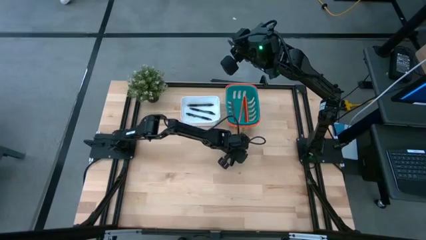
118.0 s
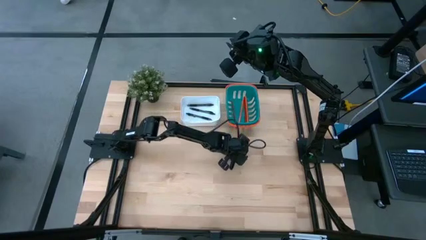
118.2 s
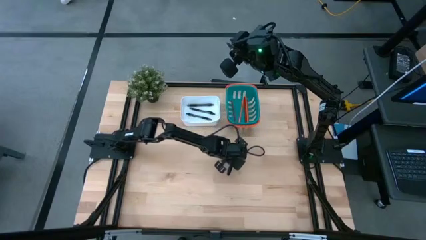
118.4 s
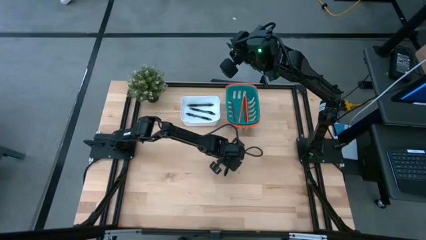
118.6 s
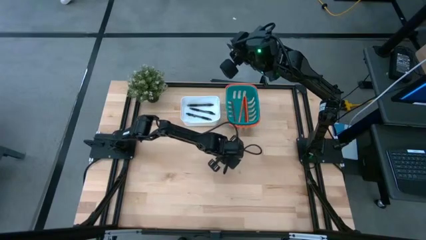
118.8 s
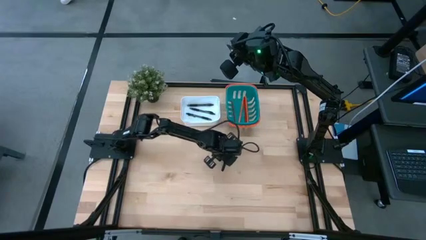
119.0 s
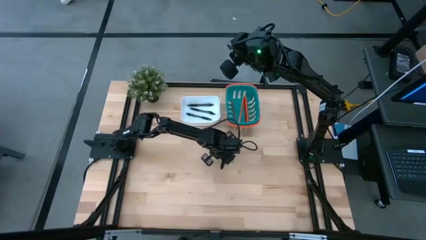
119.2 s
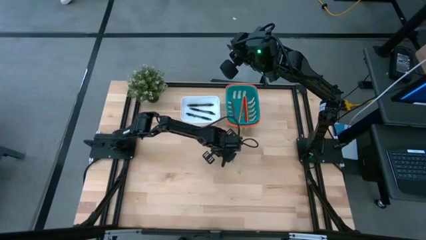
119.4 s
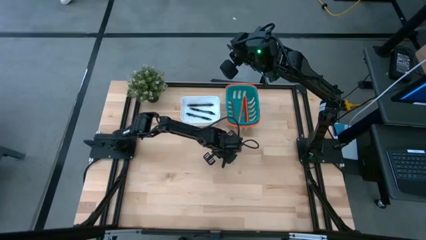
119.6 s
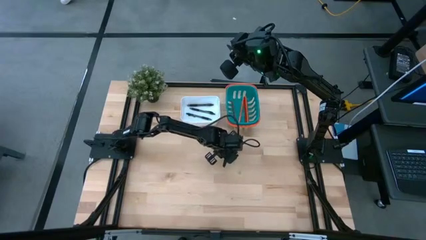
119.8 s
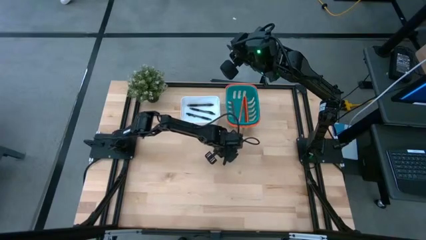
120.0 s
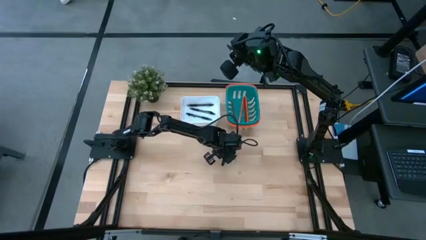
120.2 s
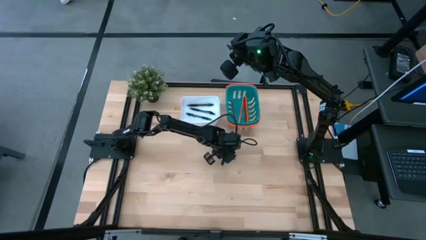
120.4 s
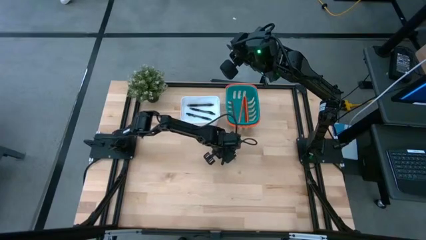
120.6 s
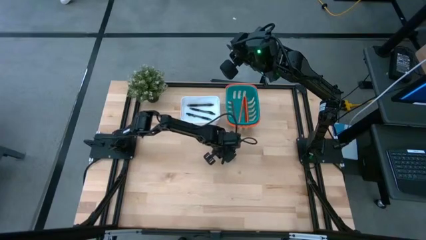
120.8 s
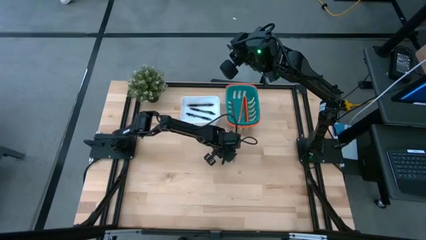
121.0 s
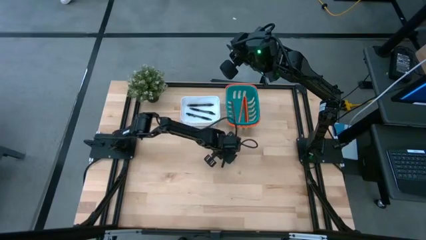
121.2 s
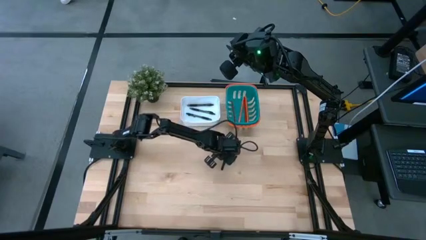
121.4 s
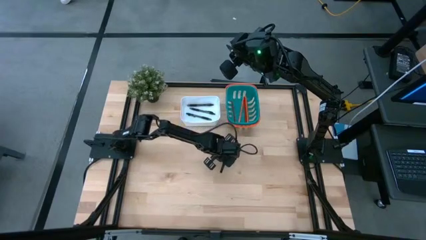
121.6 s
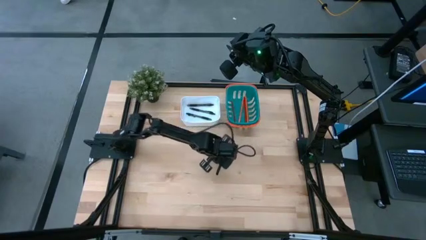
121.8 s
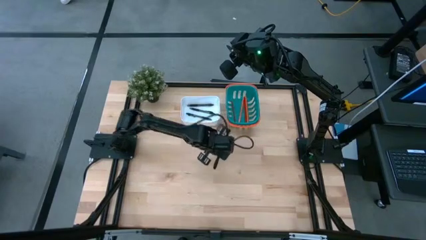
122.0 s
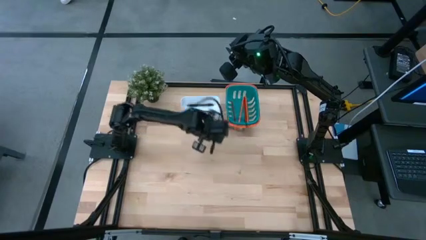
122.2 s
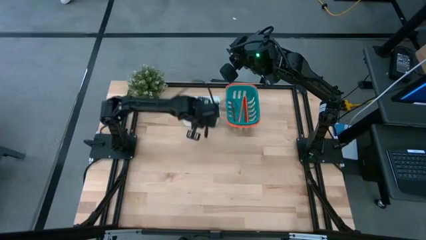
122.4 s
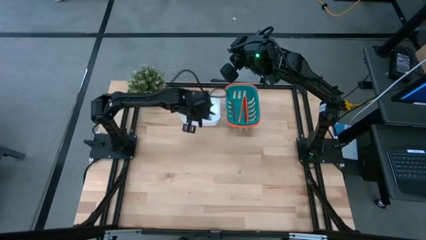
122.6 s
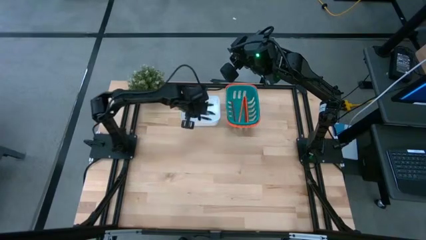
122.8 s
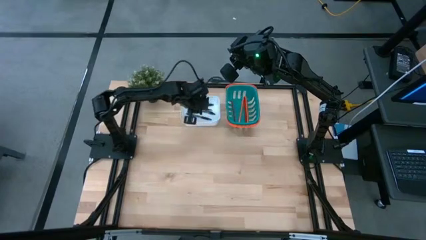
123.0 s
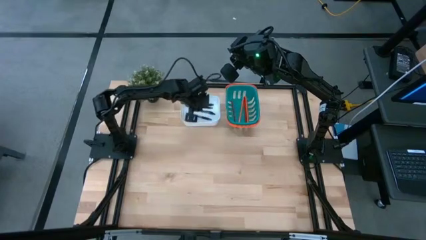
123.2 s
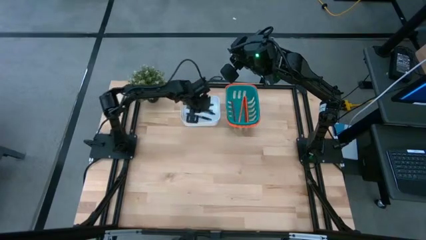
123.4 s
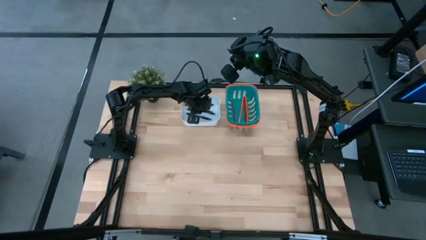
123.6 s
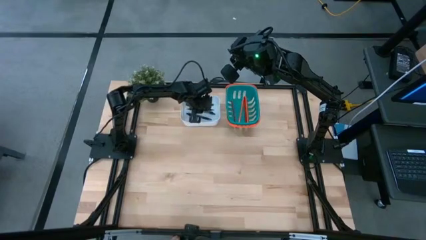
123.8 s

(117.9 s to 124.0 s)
Task: Sort pens & pencils
Put the black ballpen into the white bin

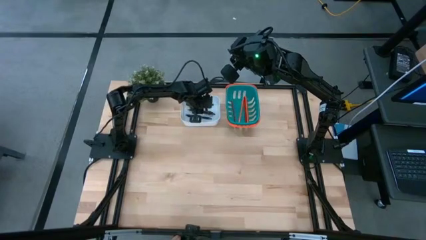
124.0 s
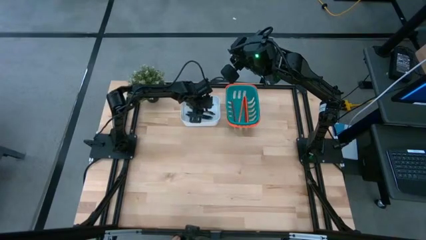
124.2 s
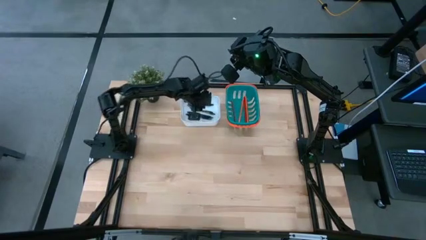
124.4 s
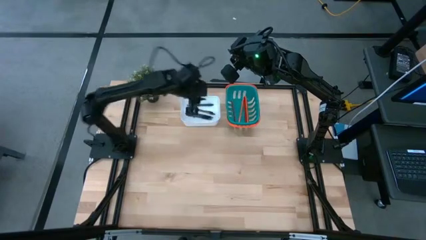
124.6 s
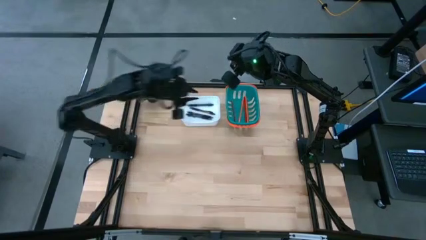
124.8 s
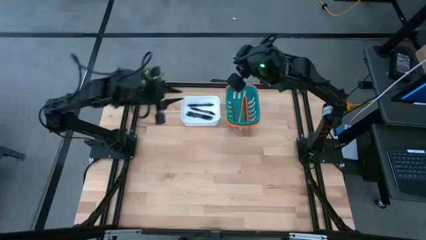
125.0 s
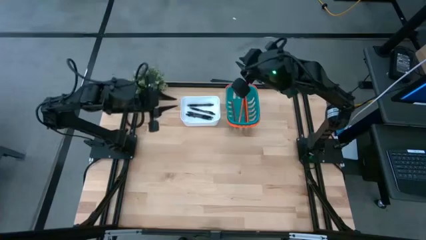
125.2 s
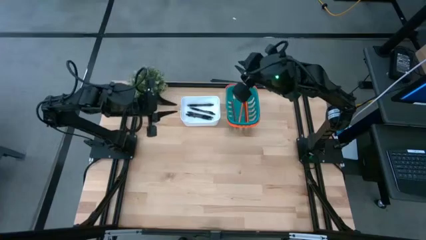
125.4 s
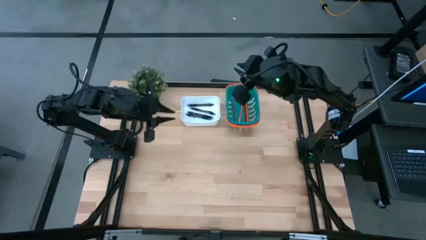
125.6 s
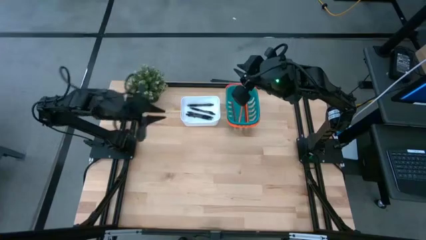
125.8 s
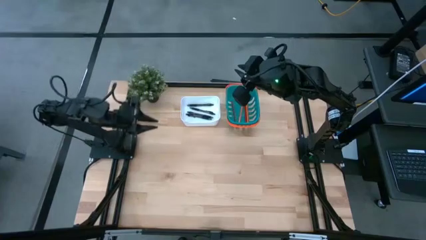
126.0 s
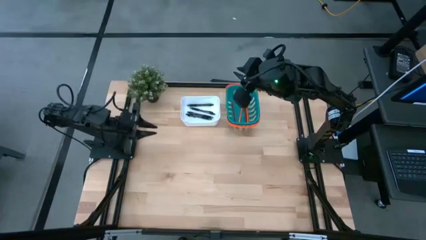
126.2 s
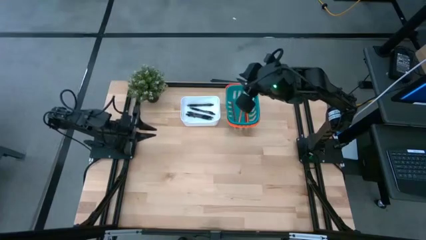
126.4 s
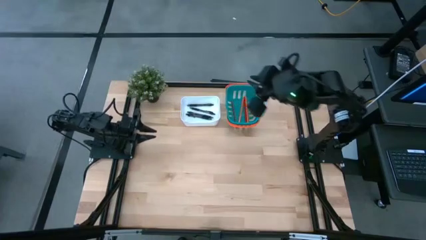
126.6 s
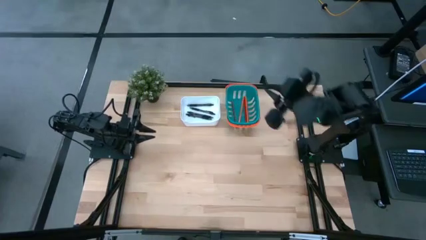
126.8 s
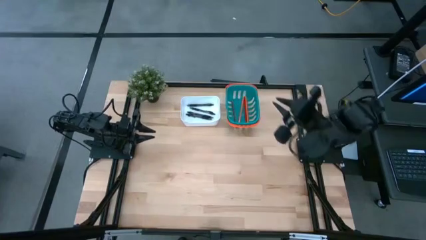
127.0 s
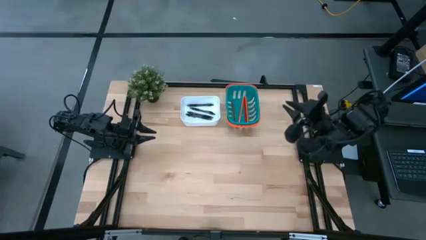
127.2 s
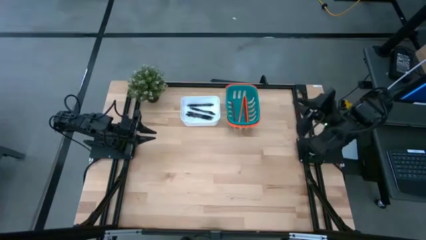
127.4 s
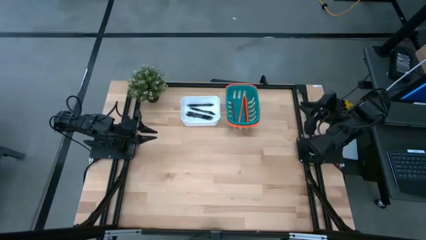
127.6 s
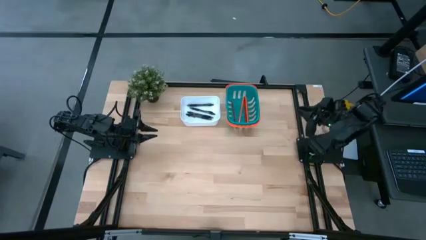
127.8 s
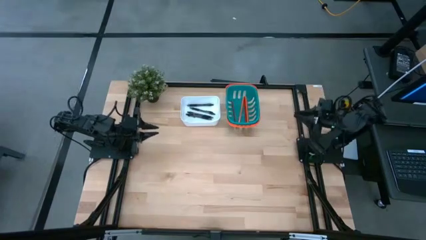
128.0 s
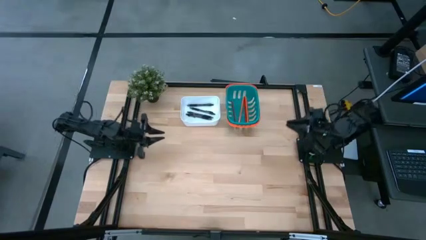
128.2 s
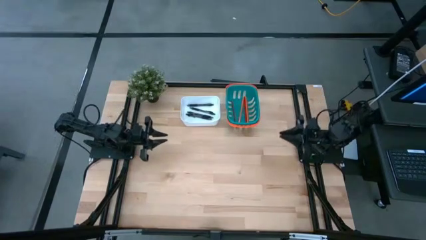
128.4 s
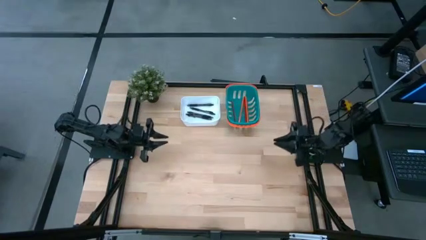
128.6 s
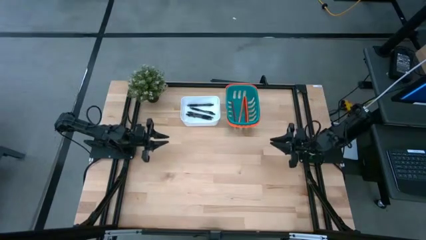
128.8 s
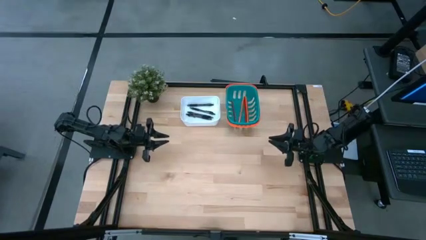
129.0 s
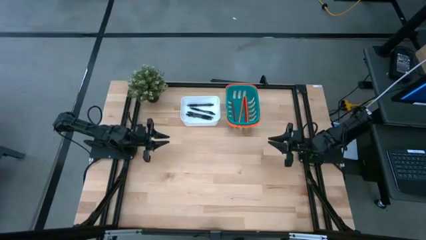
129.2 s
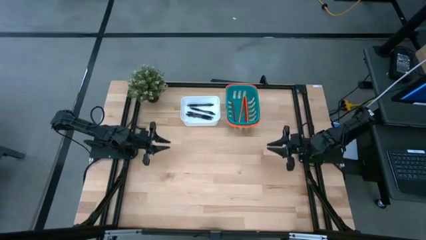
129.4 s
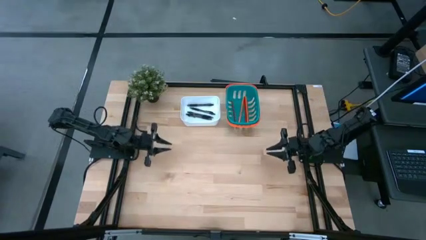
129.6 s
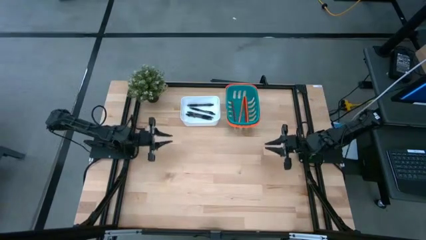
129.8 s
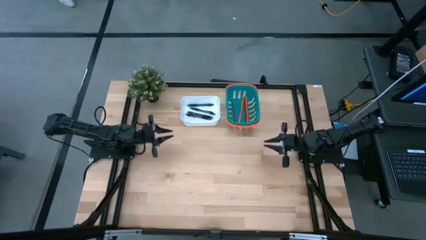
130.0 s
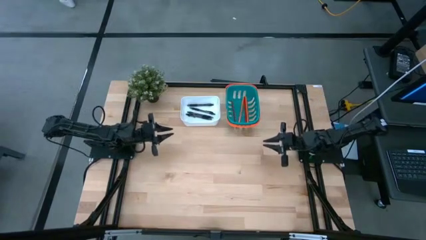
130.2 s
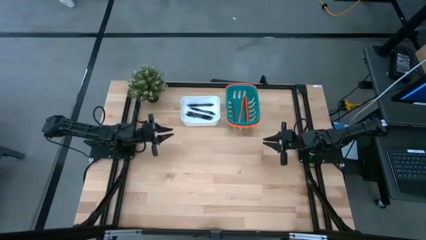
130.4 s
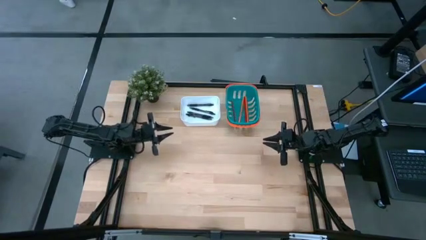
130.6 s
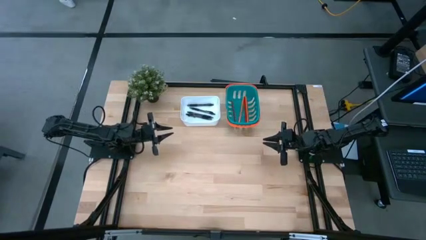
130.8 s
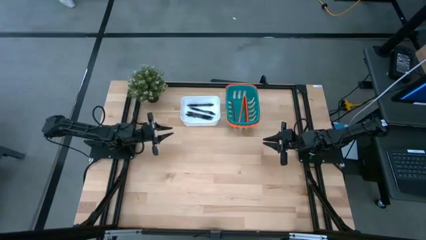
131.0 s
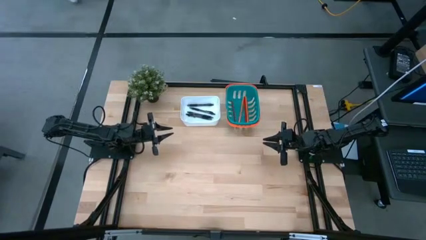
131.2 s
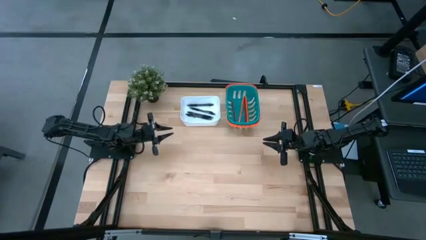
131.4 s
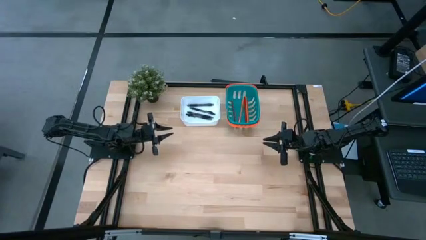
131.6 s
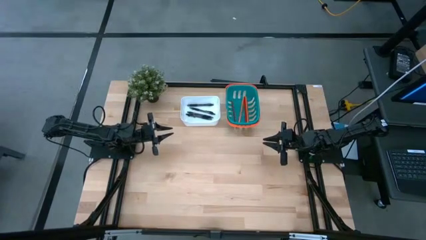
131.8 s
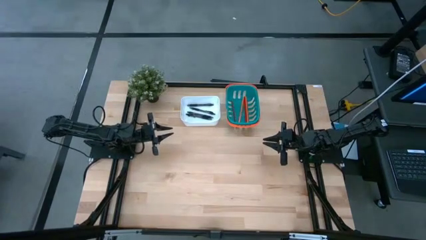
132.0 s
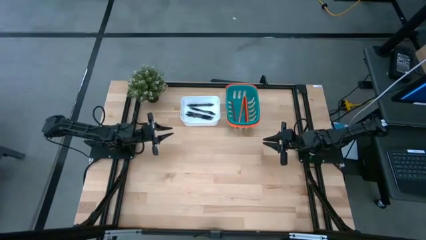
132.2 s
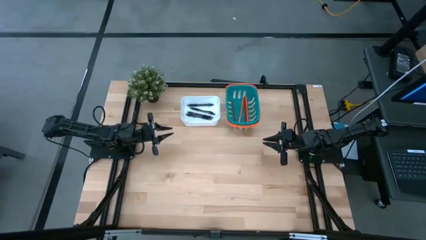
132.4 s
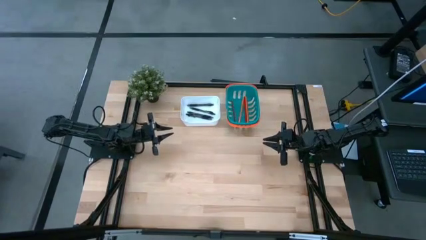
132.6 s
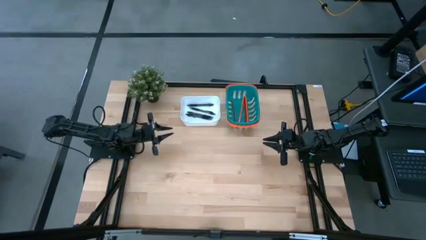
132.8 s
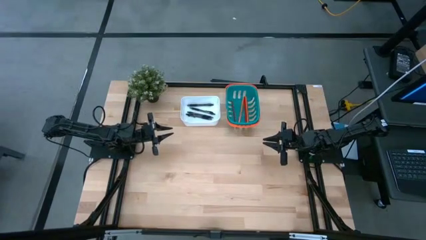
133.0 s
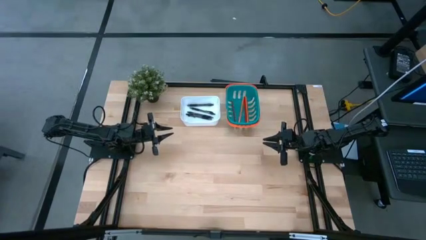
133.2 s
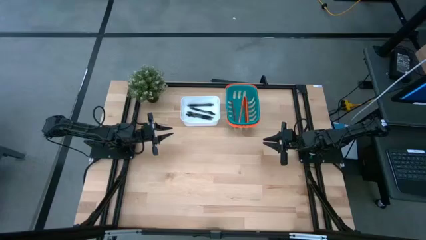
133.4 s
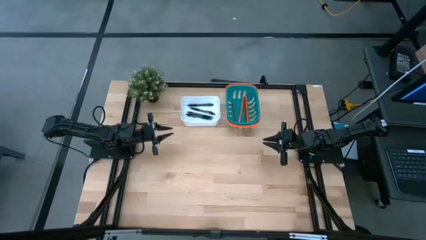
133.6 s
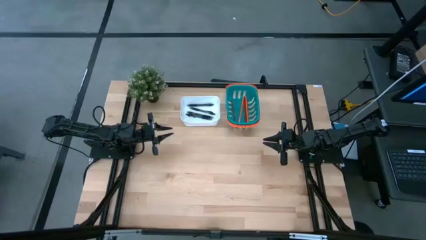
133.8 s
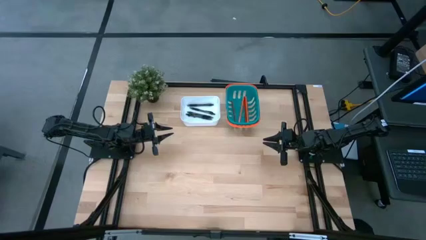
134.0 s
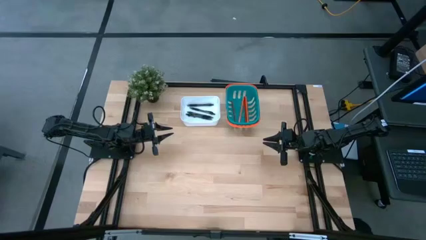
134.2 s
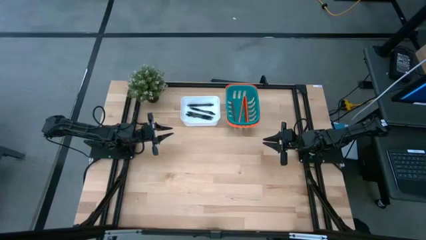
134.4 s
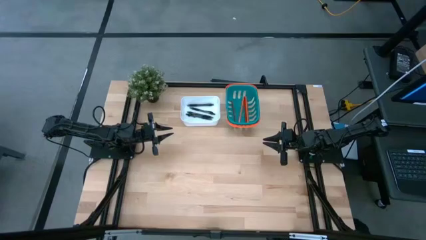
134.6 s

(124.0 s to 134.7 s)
Return to Home Position
